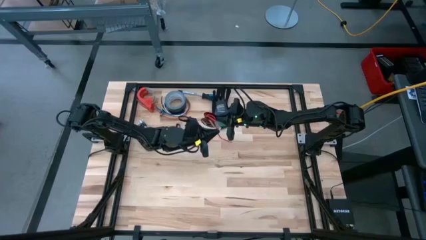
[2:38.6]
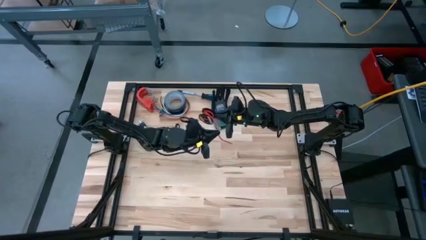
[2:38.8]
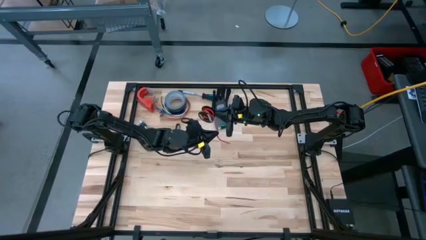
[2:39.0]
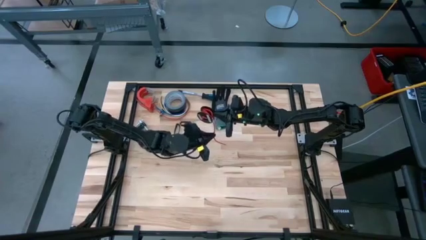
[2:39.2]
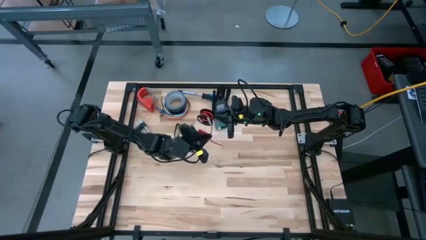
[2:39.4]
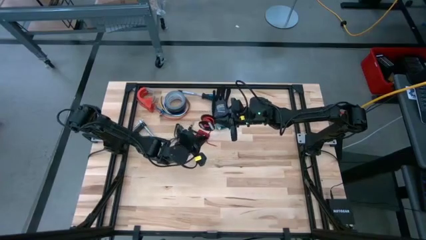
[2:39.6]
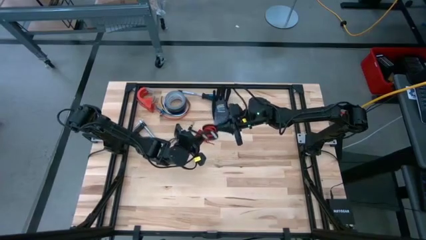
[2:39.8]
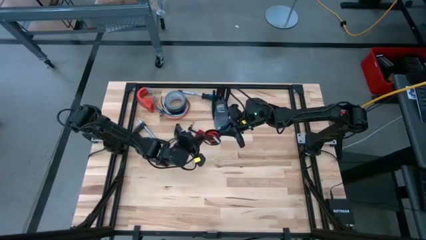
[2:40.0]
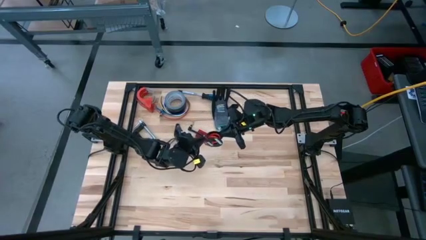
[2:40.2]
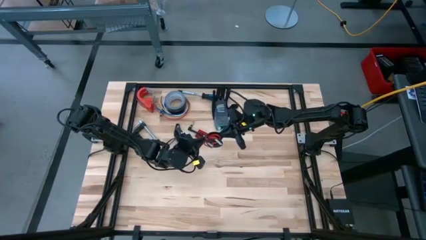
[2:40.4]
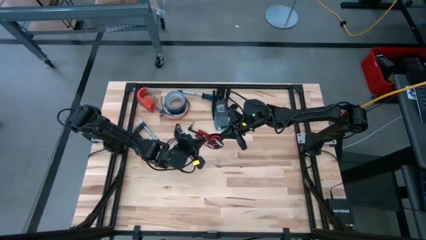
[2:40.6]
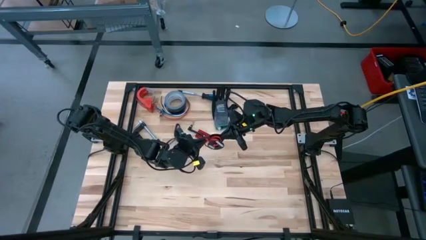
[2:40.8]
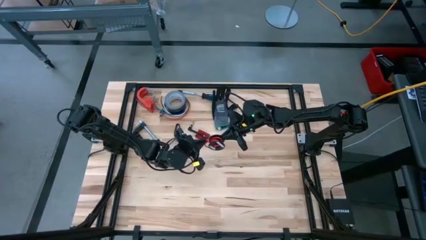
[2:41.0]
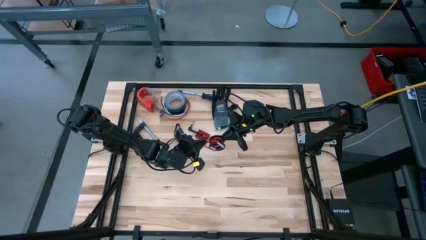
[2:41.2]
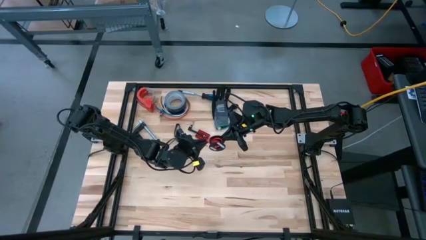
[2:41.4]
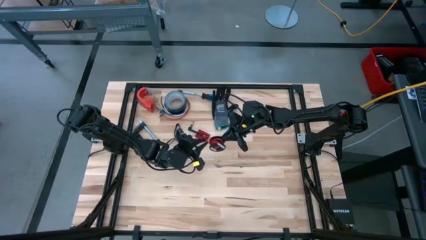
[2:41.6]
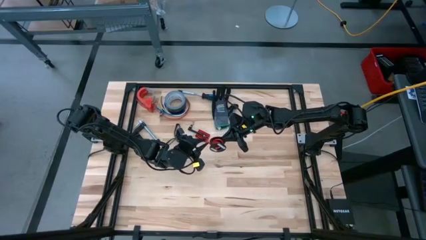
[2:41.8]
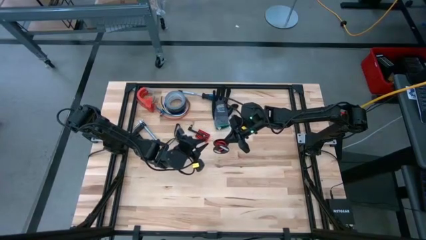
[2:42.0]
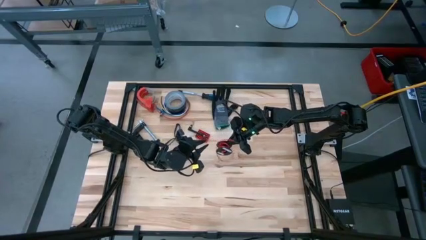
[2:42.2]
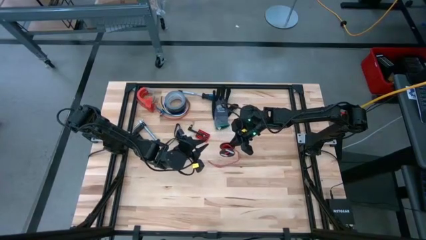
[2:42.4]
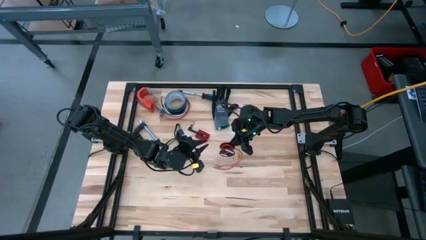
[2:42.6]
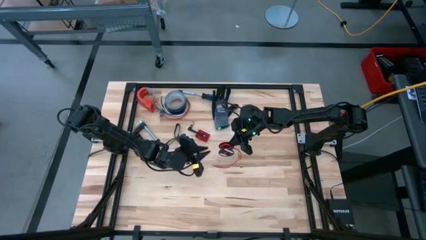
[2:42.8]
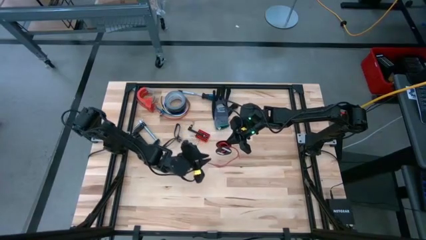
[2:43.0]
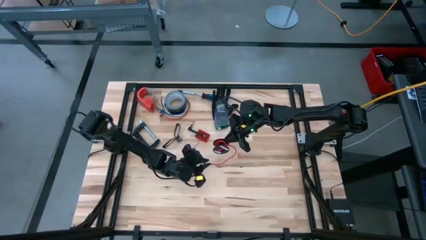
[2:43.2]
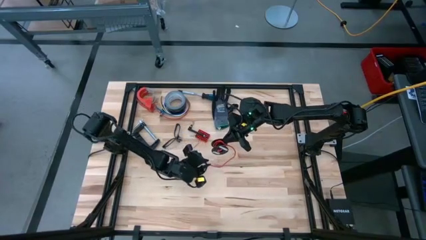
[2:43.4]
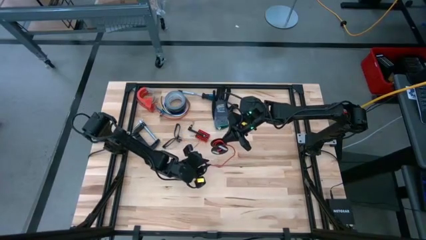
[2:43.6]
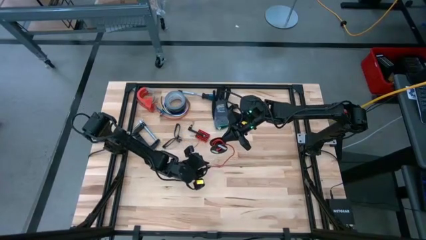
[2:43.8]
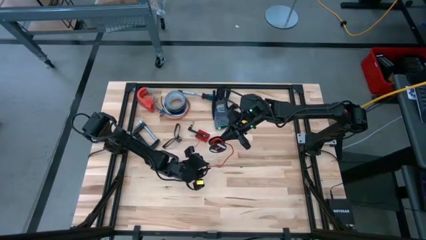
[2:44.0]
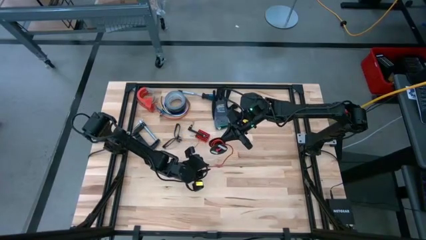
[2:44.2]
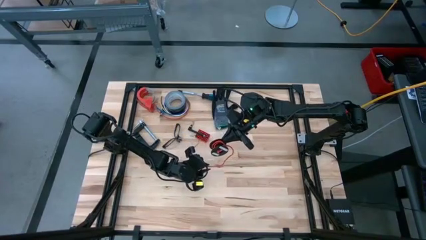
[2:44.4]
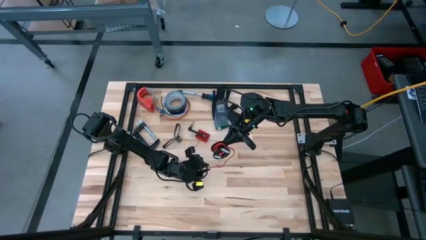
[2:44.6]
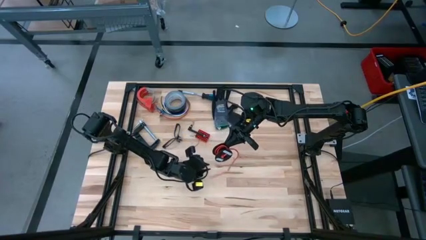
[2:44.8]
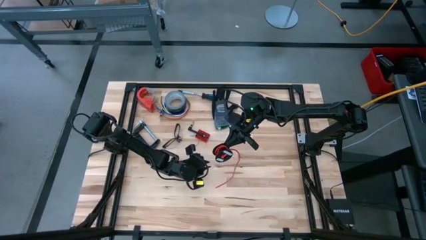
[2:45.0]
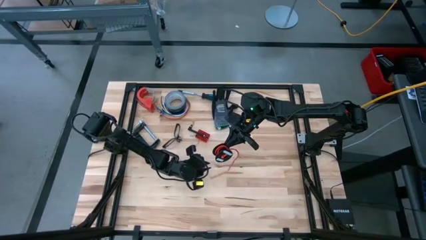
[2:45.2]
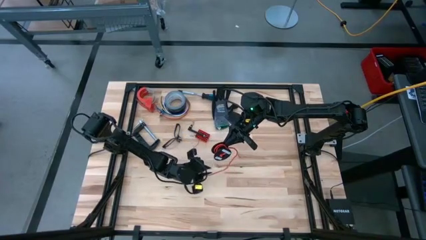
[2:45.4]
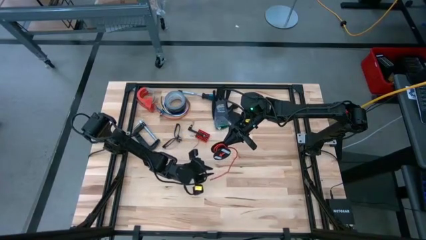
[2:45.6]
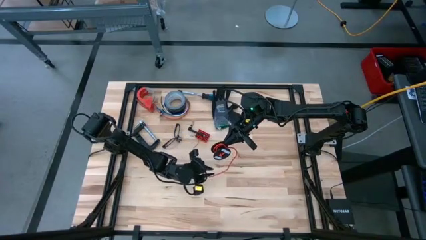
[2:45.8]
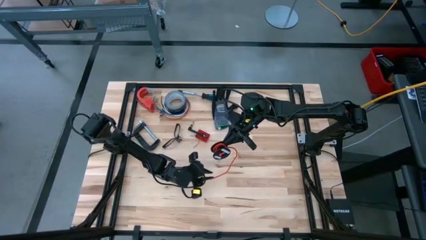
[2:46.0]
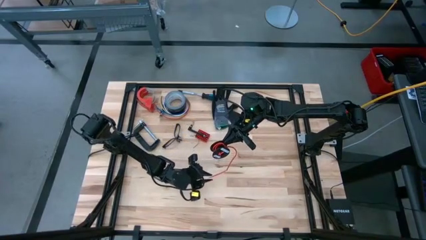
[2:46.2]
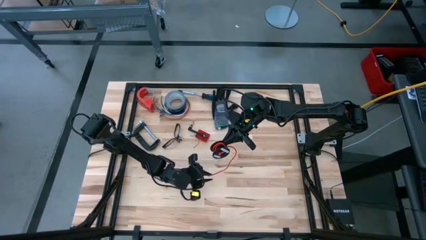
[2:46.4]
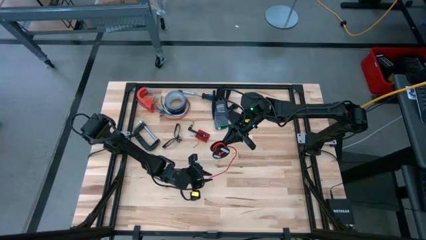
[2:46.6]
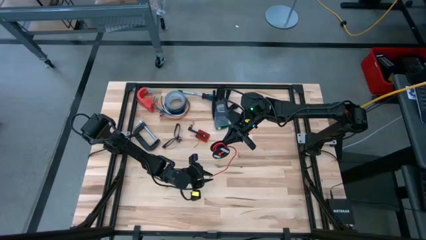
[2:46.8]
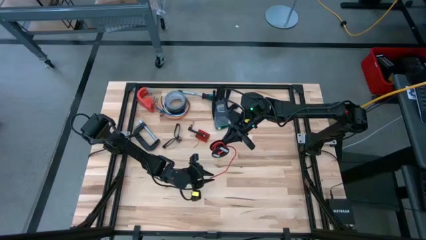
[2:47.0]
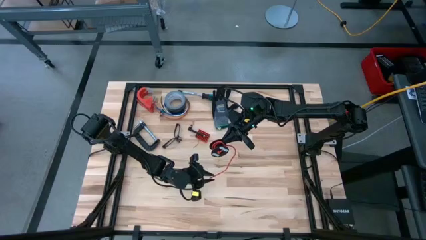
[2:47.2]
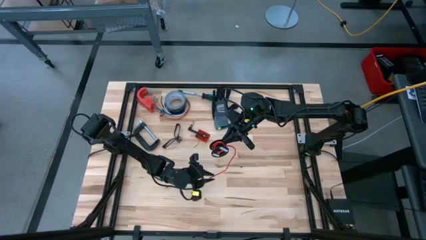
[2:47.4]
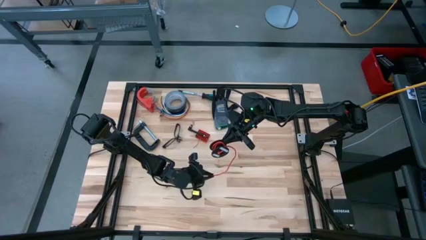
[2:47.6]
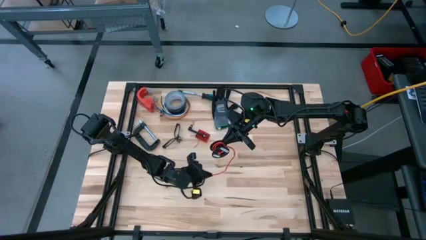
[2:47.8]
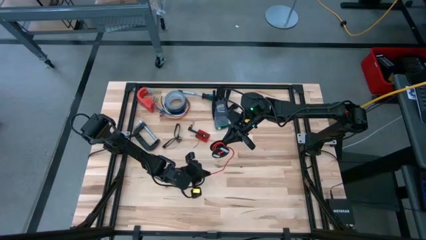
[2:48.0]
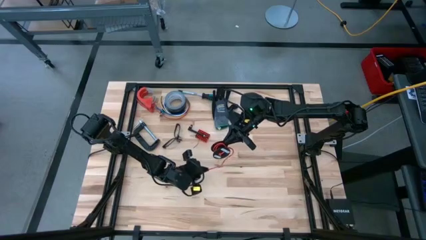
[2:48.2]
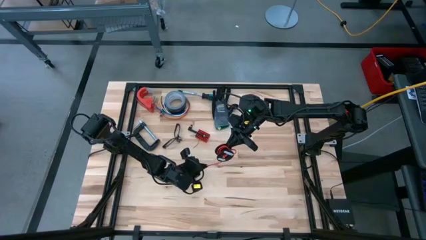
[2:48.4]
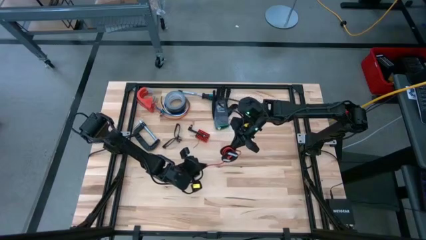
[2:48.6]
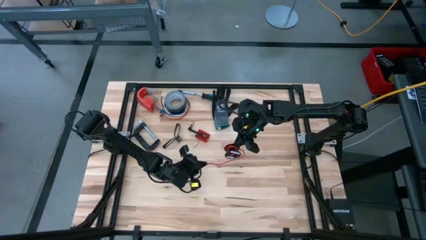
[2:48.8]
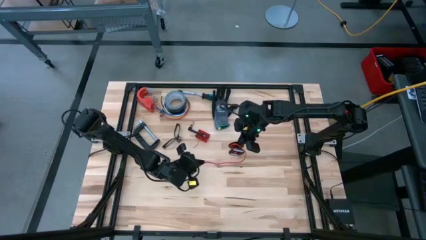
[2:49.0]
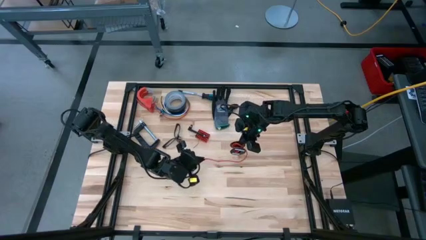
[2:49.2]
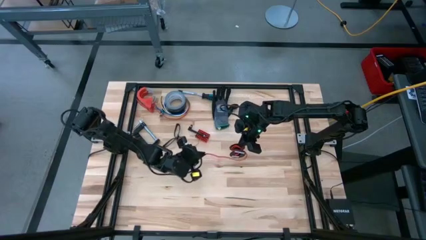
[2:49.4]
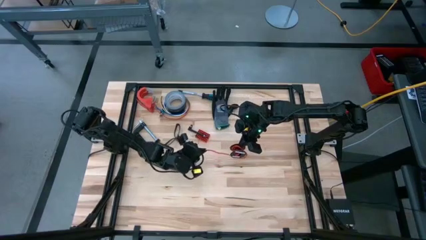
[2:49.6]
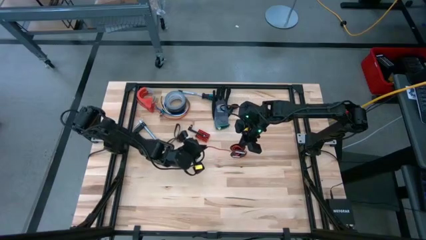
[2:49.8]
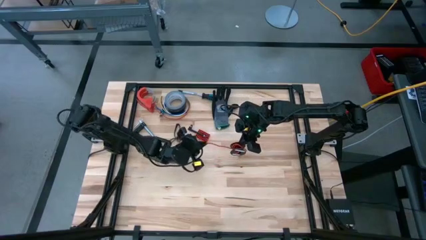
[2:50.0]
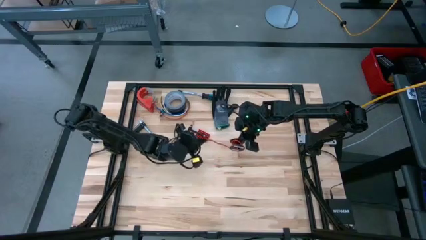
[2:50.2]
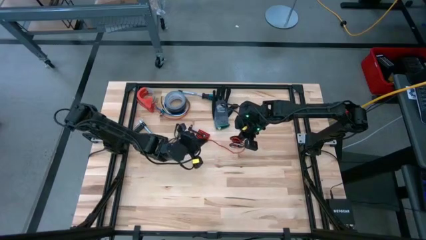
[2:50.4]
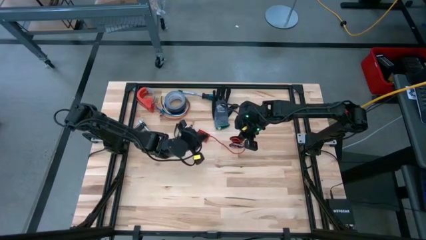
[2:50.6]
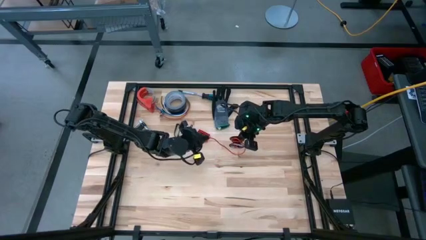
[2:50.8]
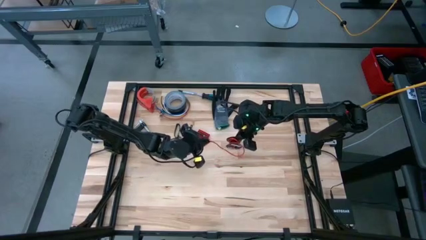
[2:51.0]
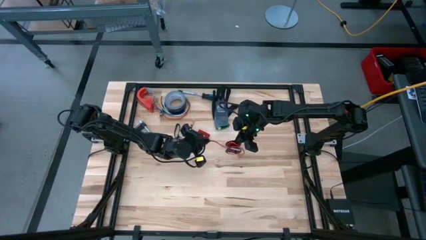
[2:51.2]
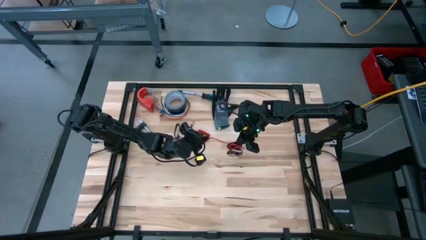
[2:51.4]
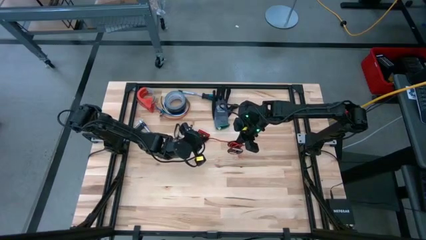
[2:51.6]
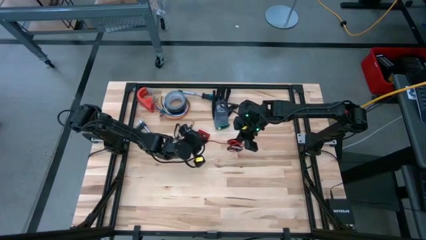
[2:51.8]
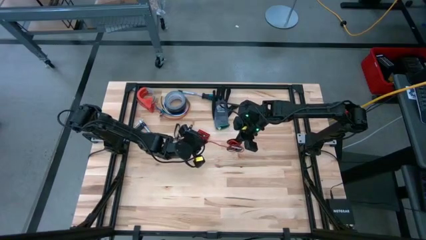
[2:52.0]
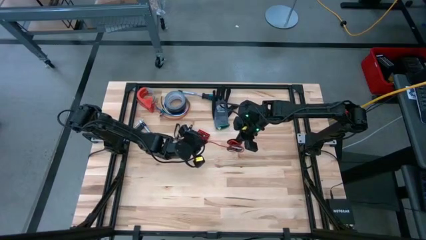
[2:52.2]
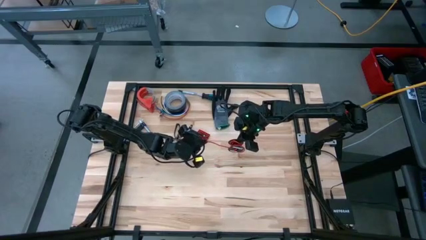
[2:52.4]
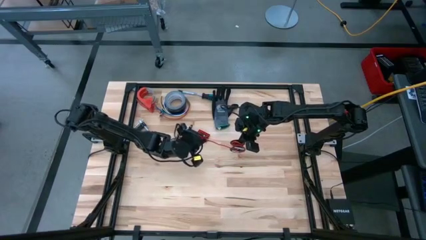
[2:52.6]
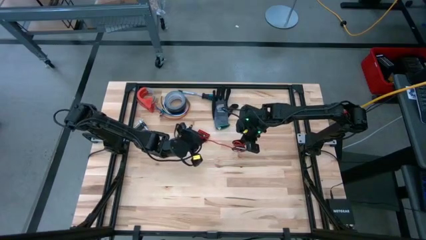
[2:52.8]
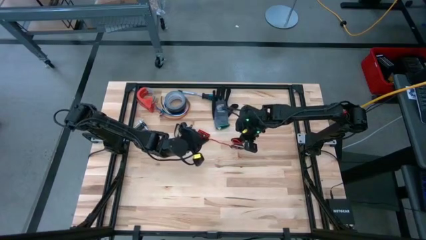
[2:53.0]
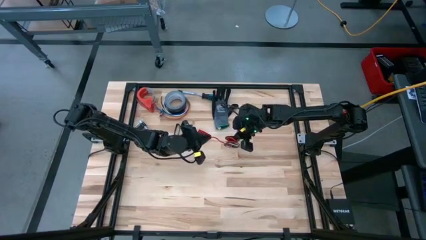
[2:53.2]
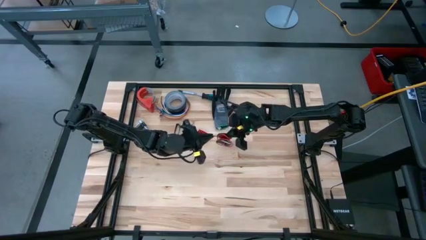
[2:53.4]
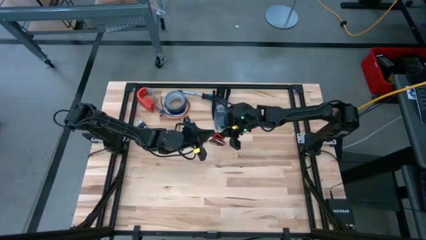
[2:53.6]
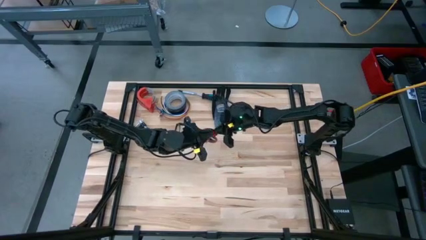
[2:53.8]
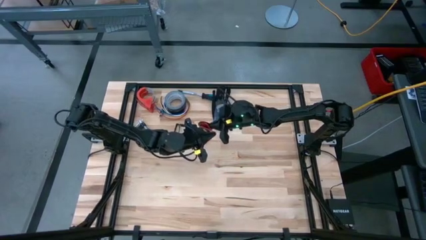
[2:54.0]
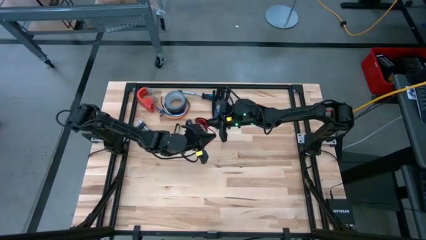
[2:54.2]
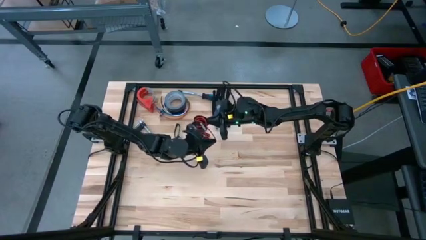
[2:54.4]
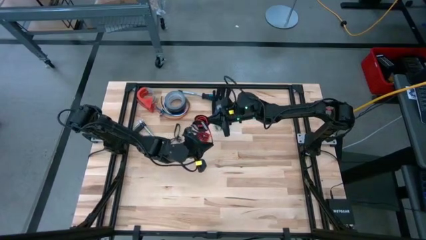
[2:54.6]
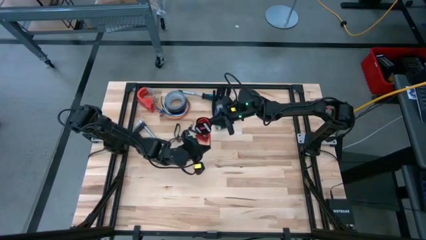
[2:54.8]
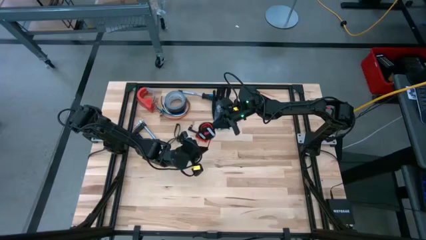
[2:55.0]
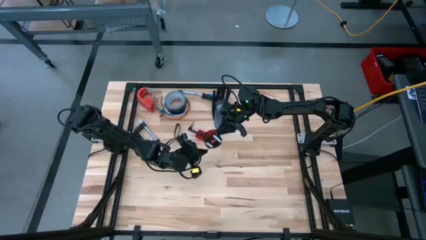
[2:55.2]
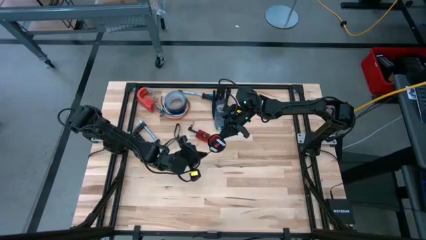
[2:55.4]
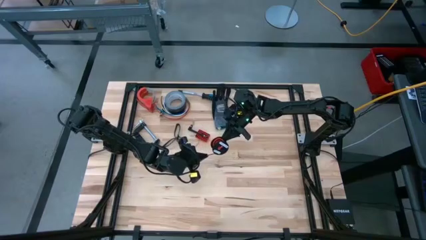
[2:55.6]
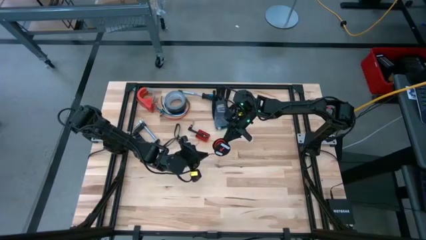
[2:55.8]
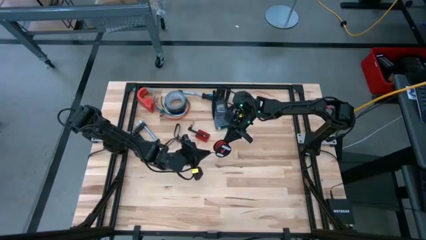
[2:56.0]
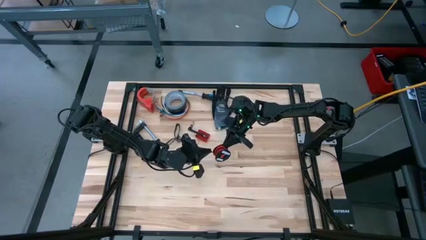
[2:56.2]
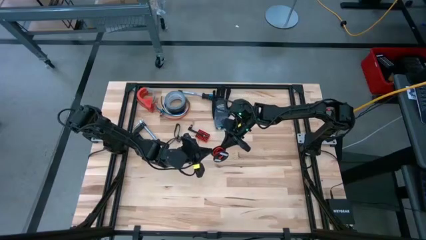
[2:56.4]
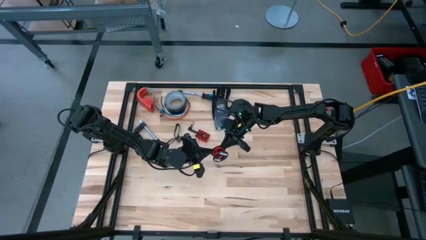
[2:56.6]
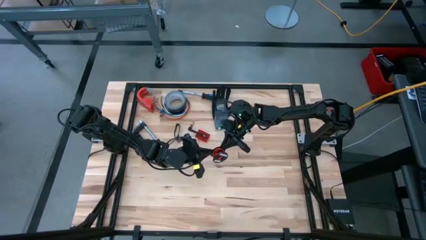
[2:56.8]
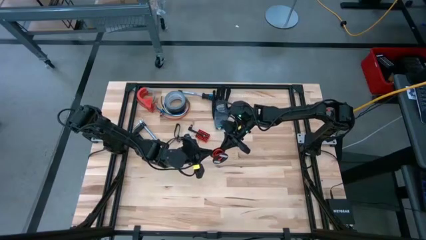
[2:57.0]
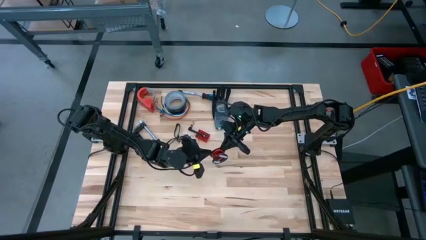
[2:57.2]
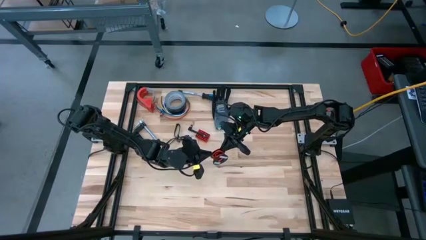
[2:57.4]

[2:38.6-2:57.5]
Task: Coil cords
Coil the orange wire into the black spool
